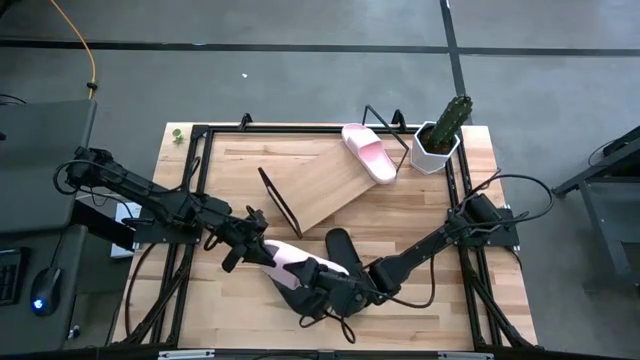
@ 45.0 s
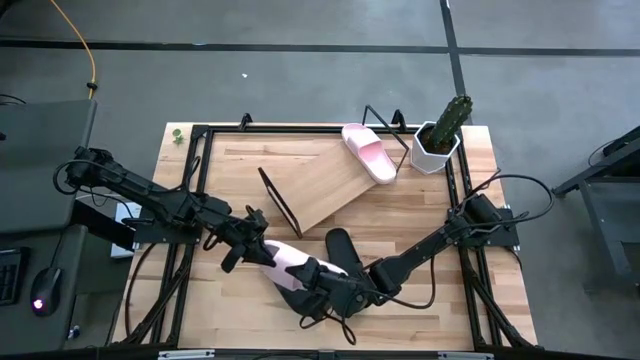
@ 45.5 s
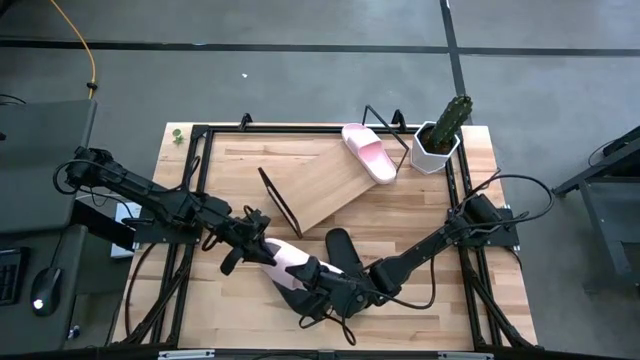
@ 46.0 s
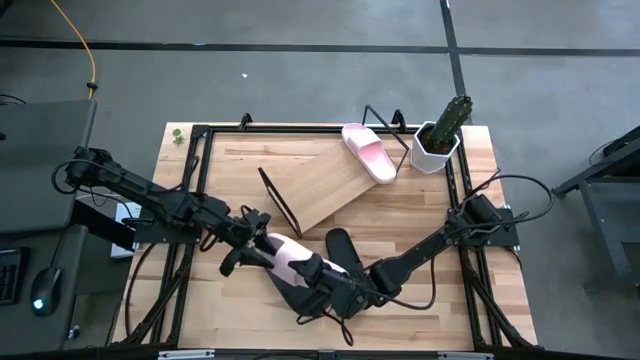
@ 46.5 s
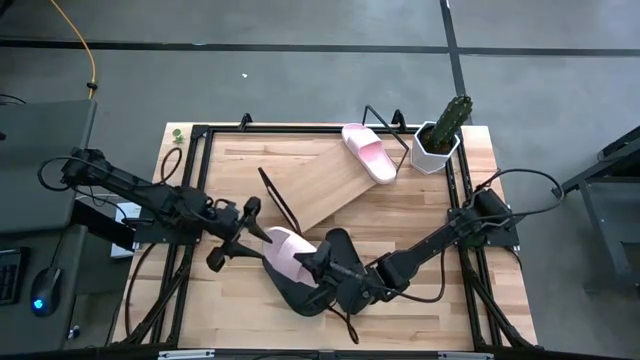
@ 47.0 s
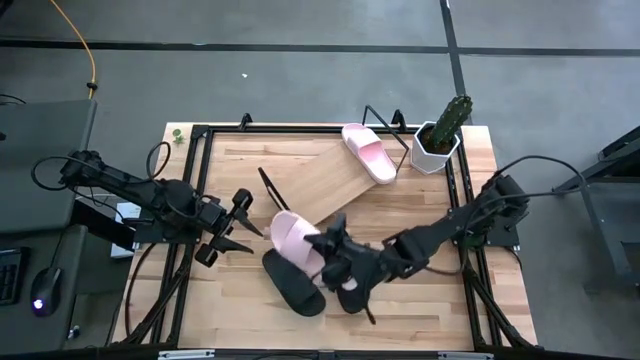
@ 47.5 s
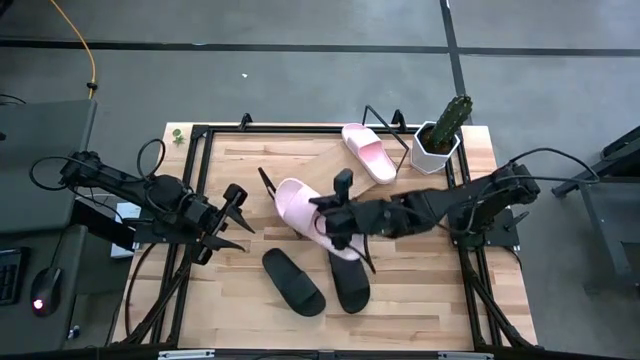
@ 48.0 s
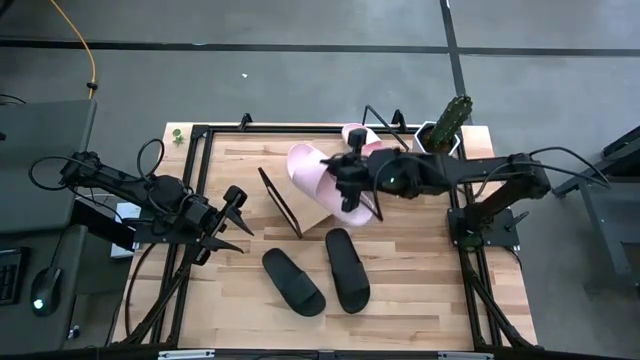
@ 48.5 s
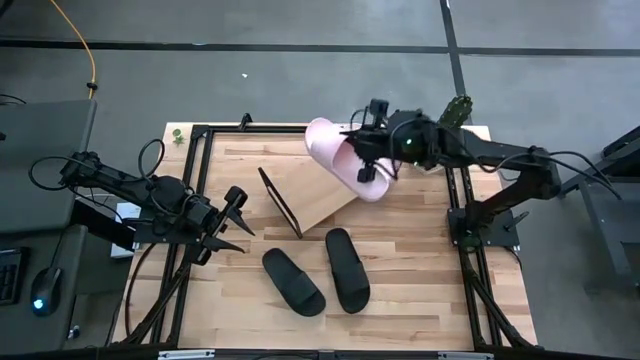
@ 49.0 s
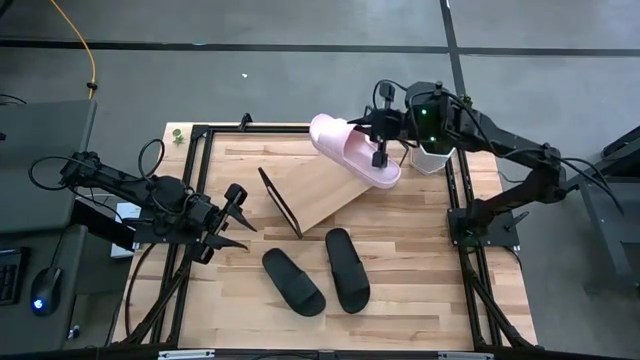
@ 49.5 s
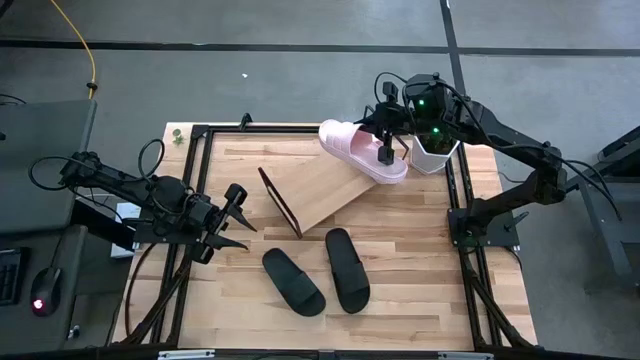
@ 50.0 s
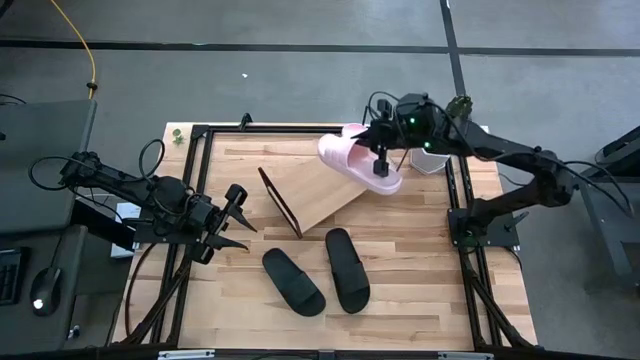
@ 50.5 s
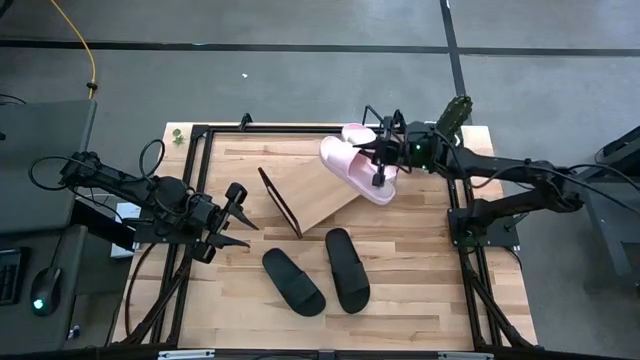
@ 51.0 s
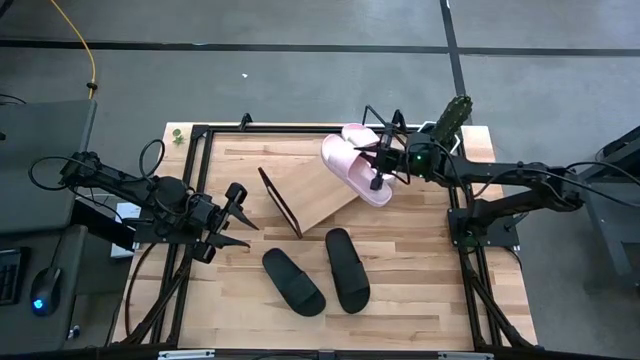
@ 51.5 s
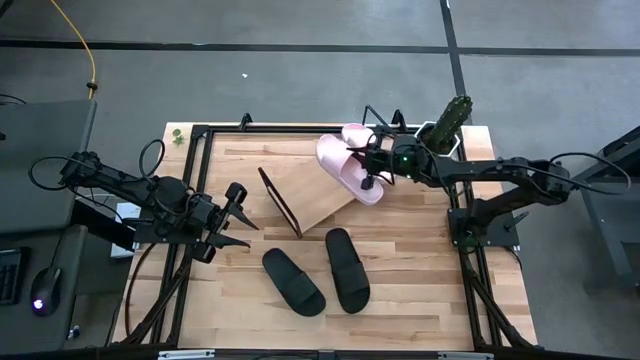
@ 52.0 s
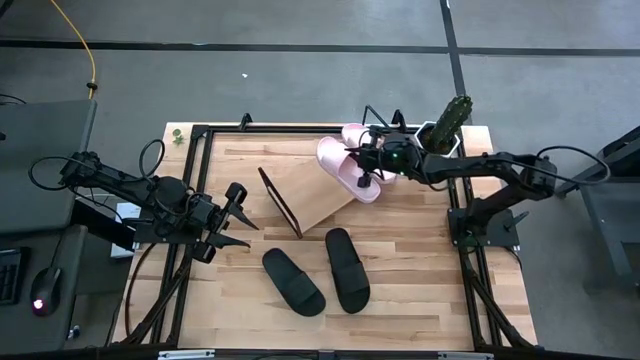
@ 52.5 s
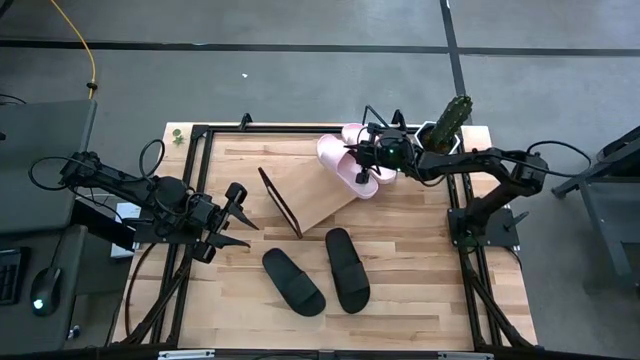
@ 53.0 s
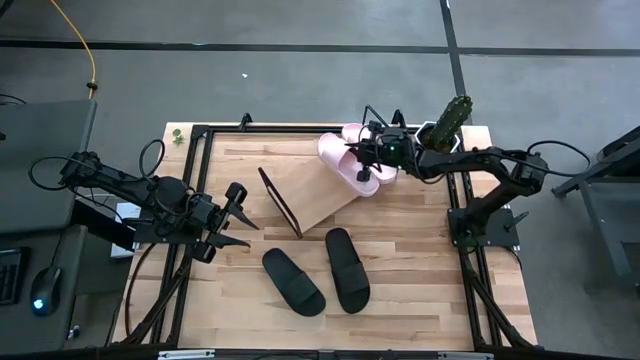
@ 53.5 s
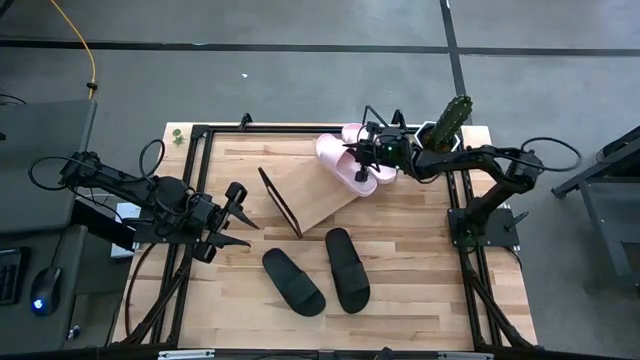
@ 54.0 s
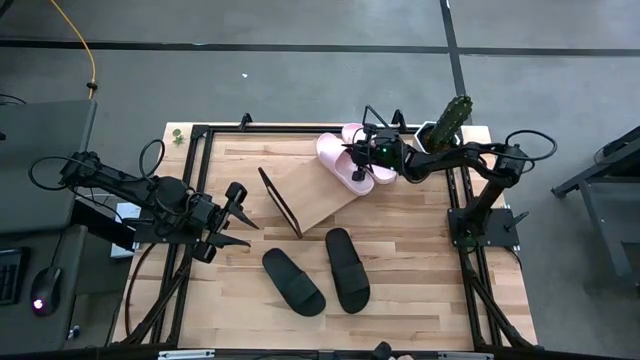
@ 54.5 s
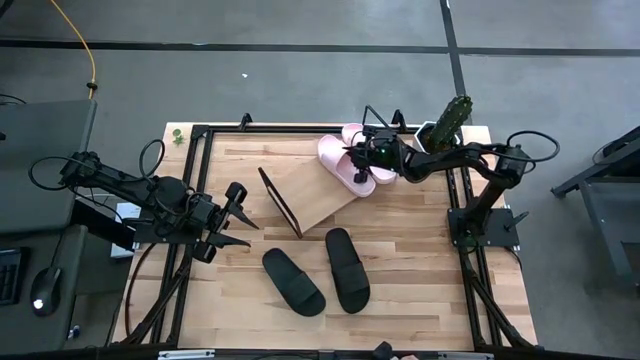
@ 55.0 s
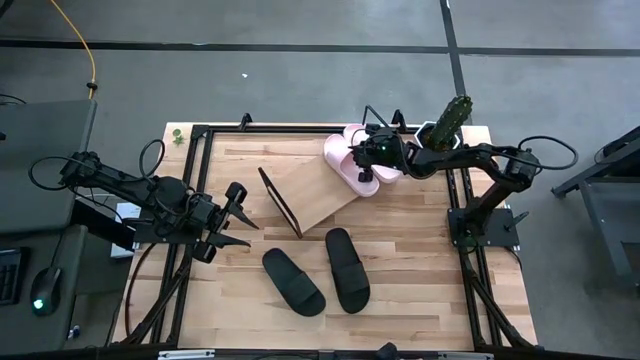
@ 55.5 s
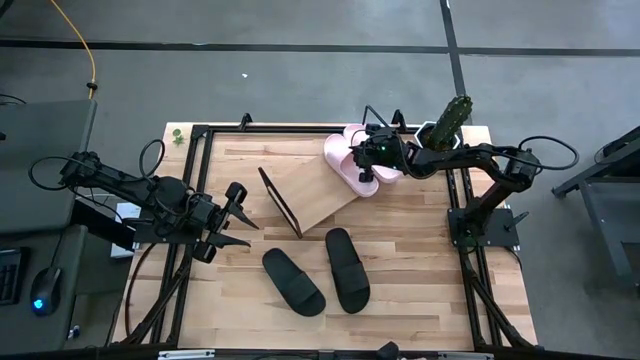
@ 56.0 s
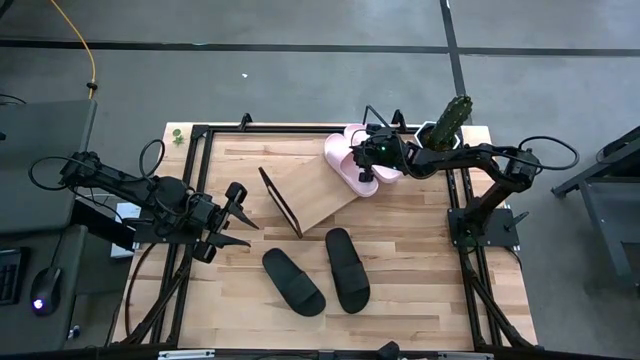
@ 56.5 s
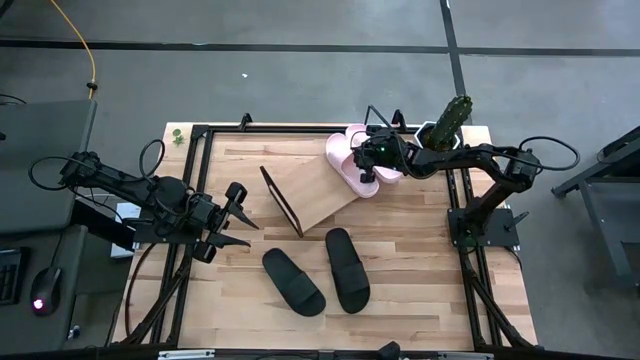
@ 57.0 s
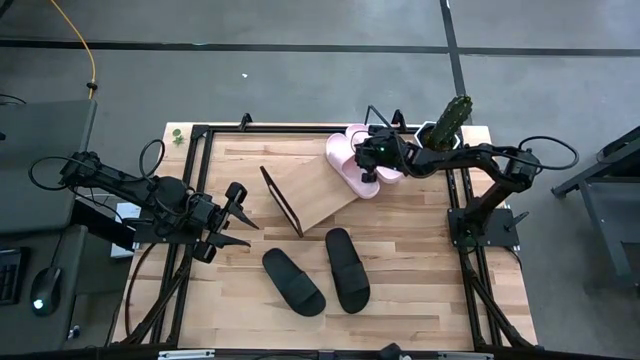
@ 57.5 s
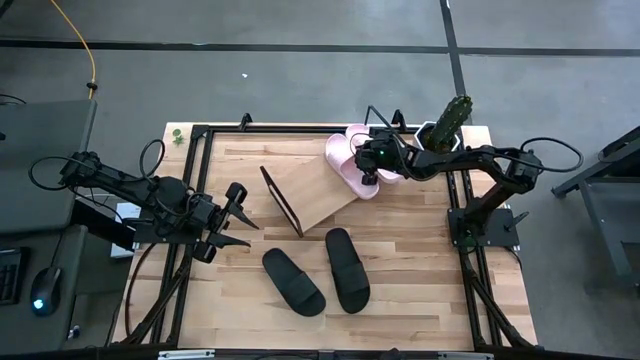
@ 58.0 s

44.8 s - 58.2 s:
Task: Pick and place slides into the shelf
Put the pink slide on the shelf

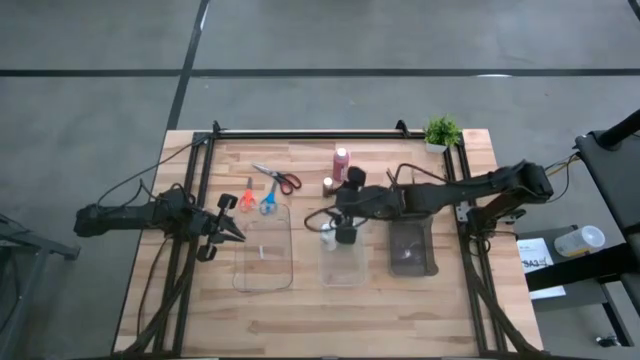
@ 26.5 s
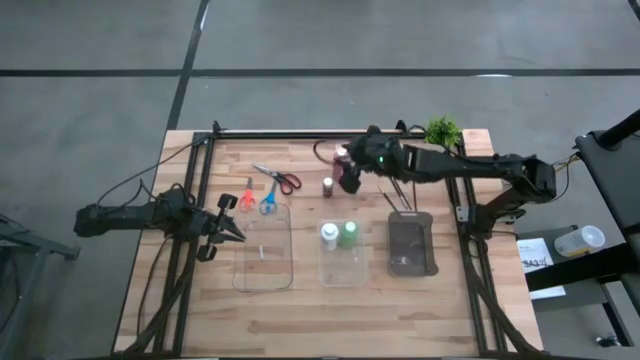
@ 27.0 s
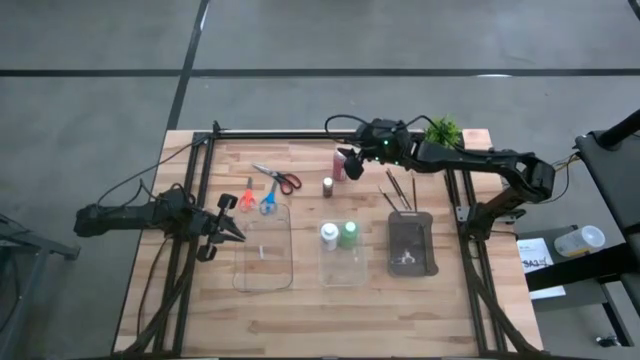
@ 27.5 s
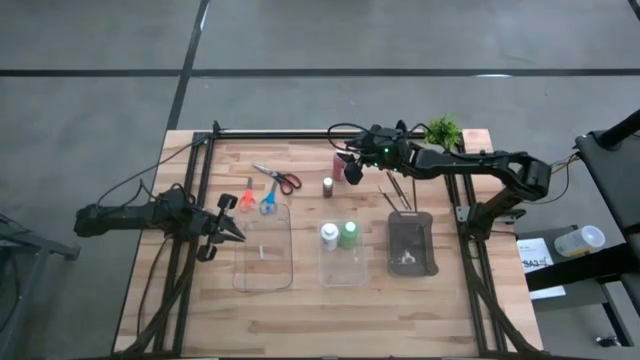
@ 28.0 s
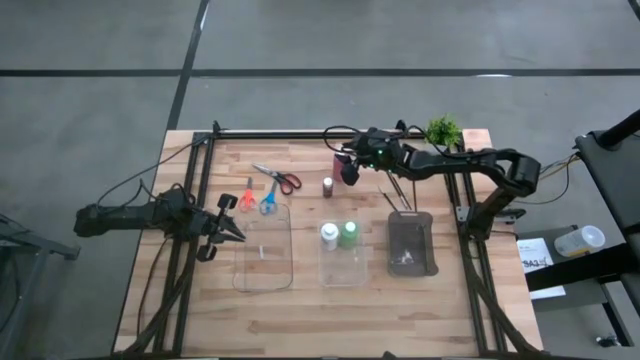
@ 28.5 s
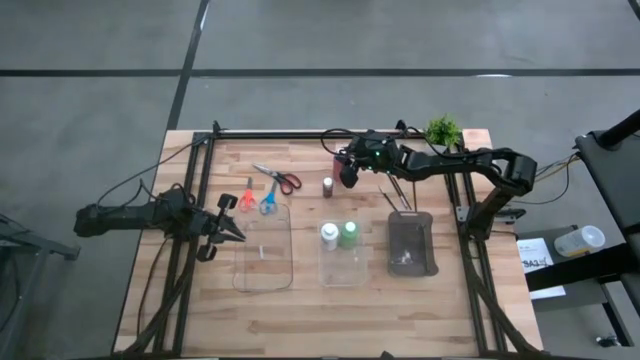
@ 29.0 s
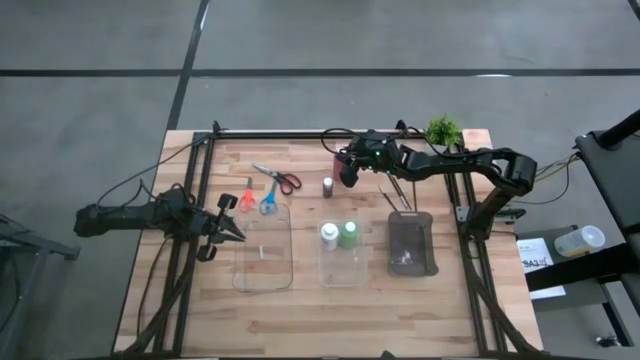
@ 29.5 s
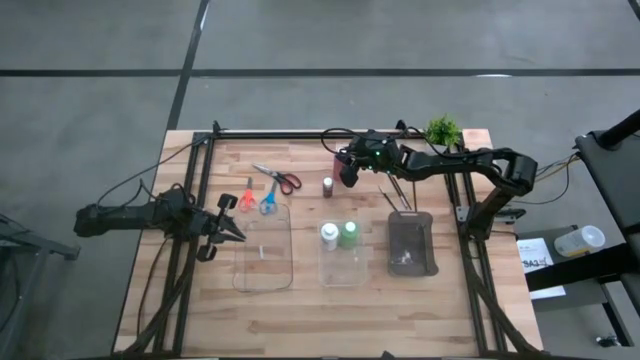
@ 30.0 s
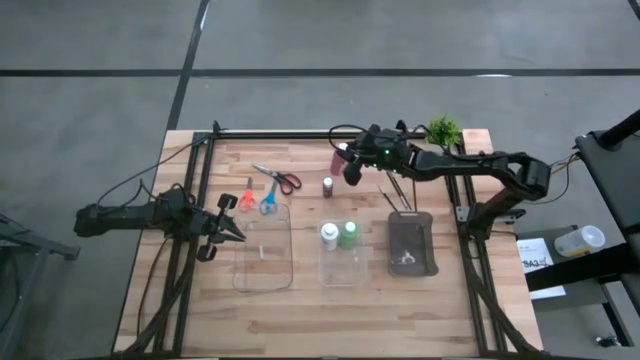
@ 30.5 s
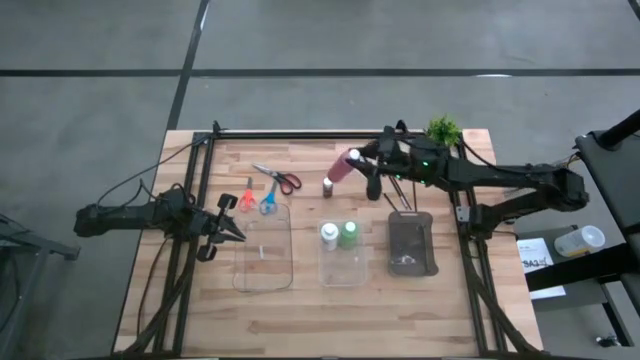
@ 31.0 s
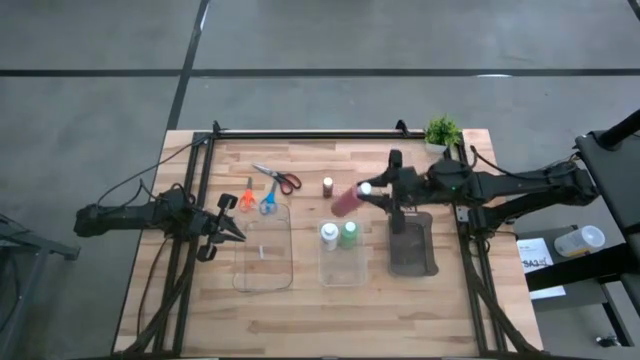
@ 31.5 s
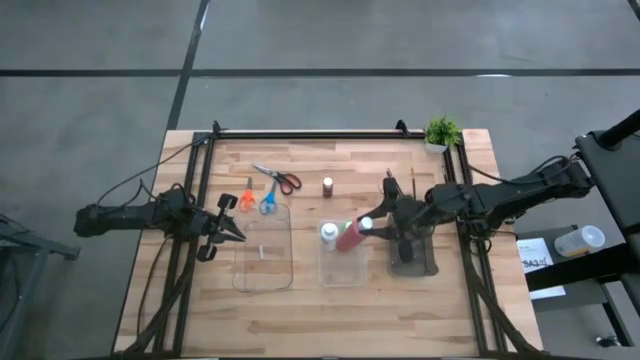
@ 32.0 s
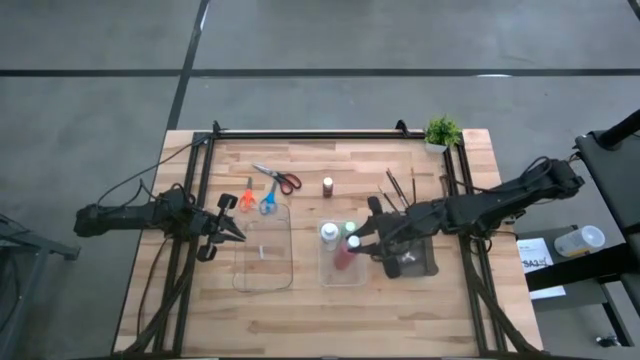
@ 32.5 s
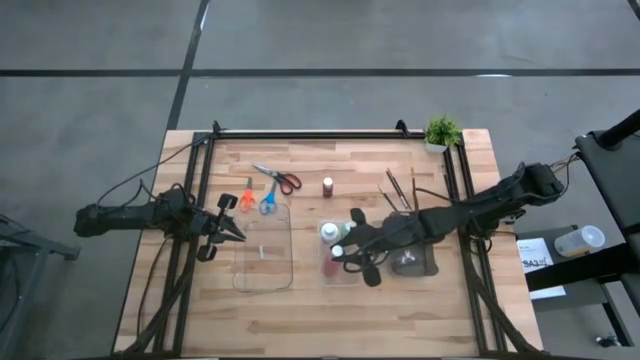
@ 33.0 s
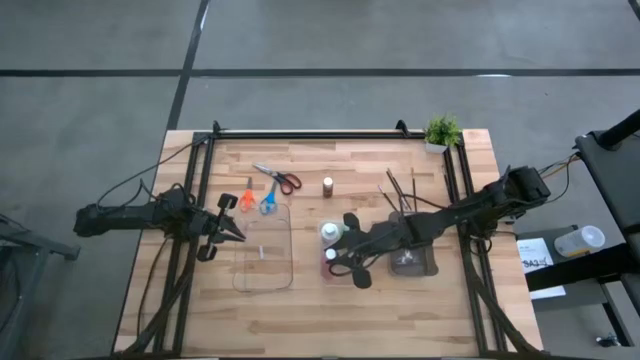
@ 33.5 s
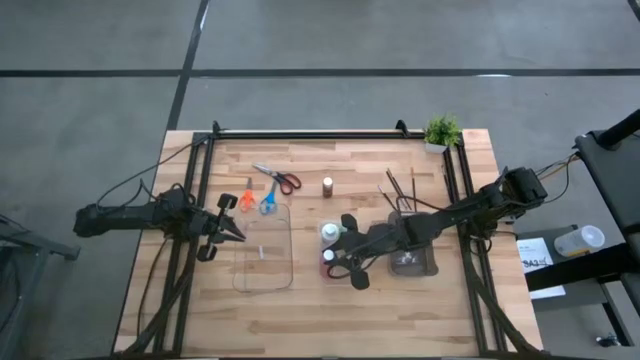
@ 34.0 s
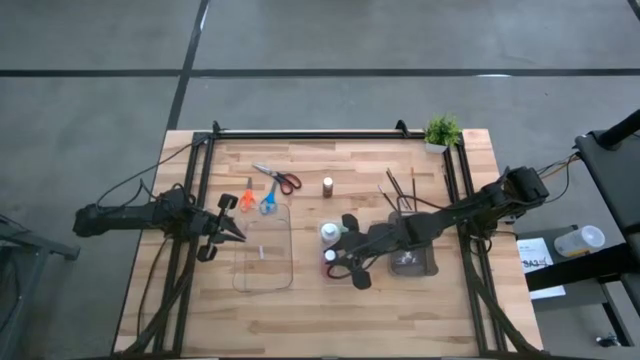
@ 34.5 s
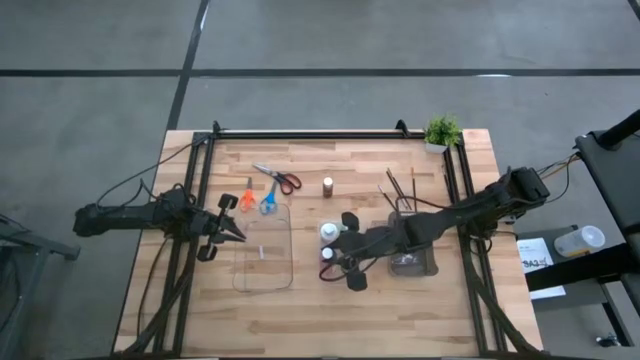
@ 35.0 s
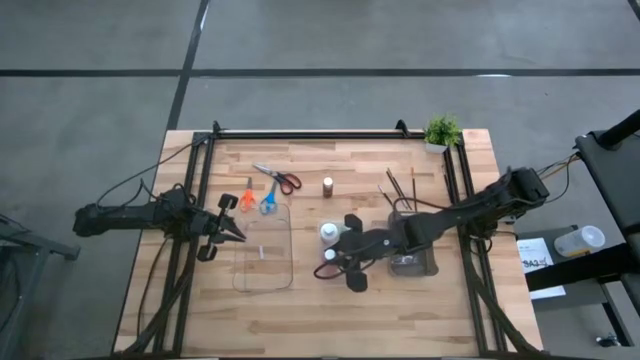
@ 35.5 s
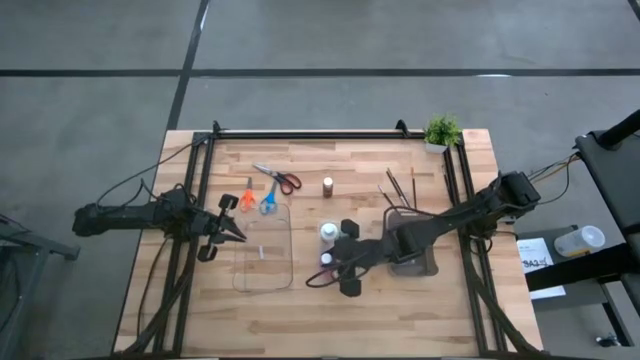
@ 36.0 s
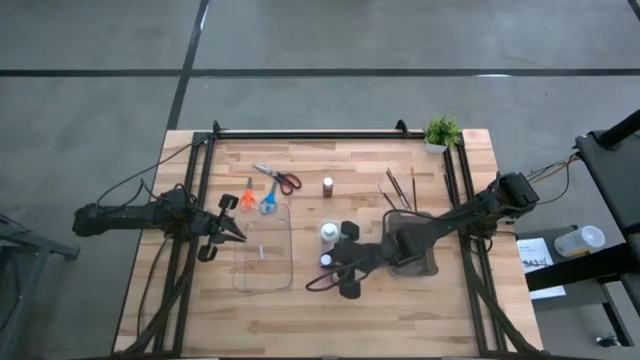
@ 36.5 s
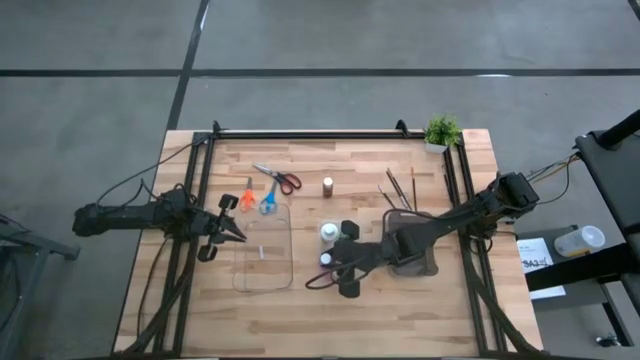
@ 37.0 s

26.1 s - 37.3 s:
Task: Pick & Place Paint Supplies
Put the pink bottle into the white transparent bin
